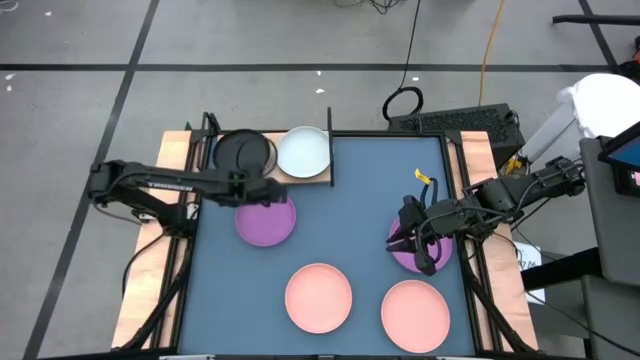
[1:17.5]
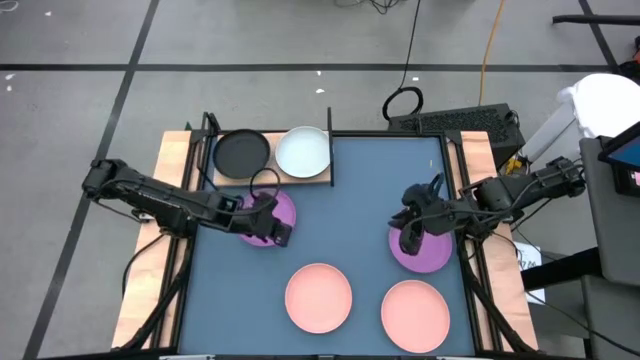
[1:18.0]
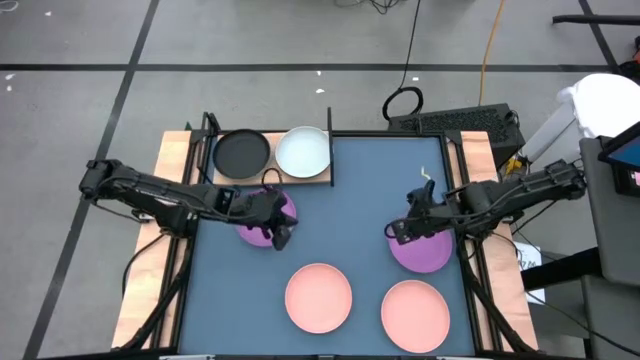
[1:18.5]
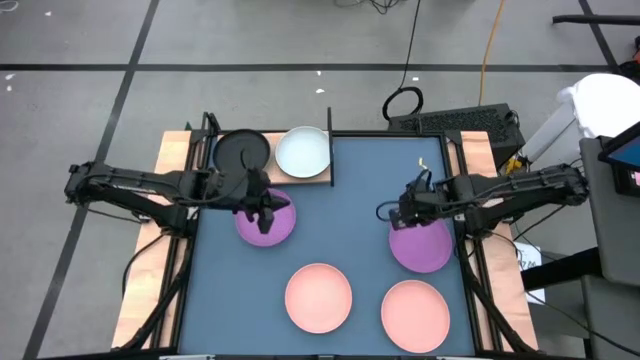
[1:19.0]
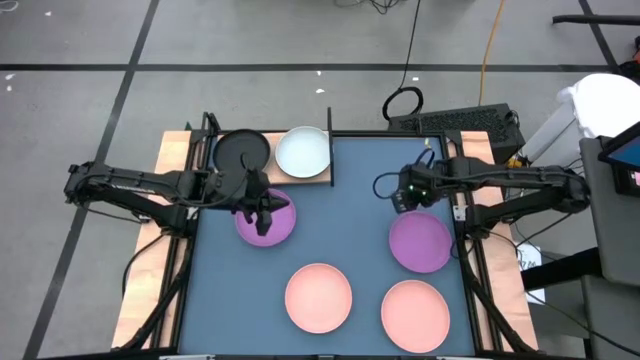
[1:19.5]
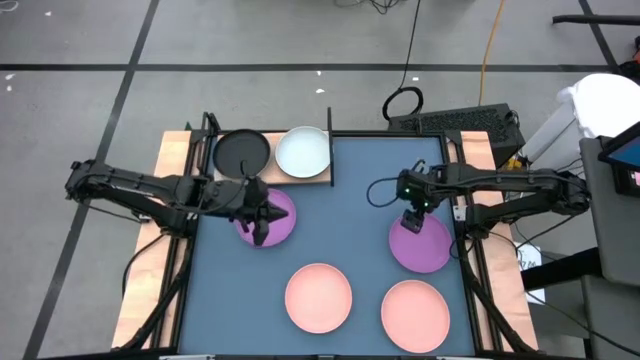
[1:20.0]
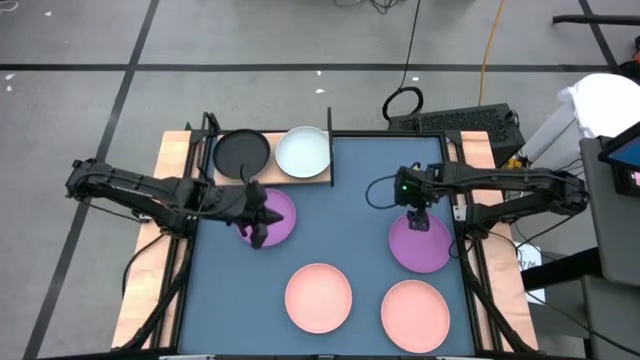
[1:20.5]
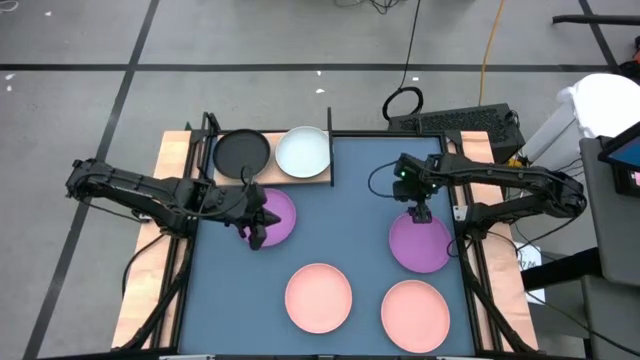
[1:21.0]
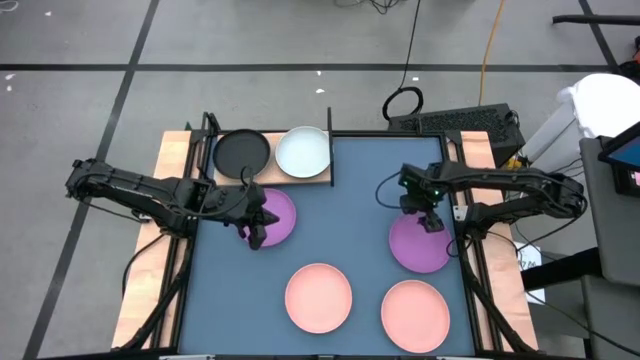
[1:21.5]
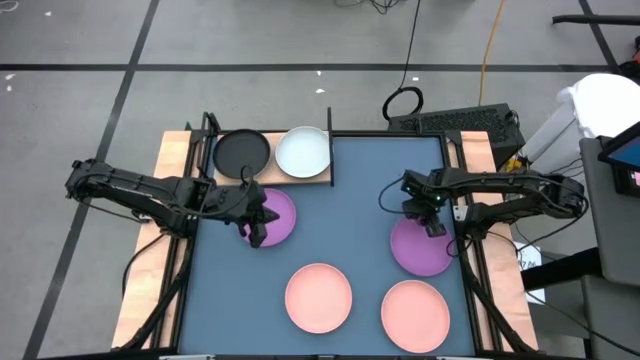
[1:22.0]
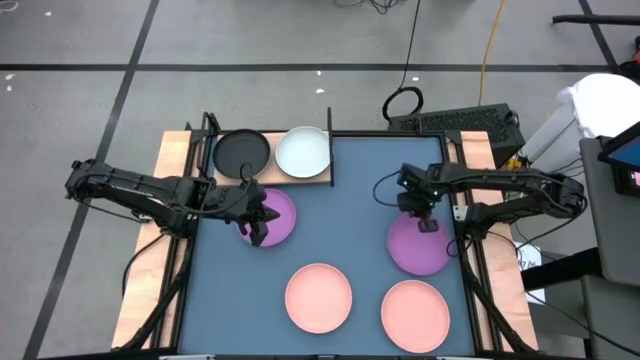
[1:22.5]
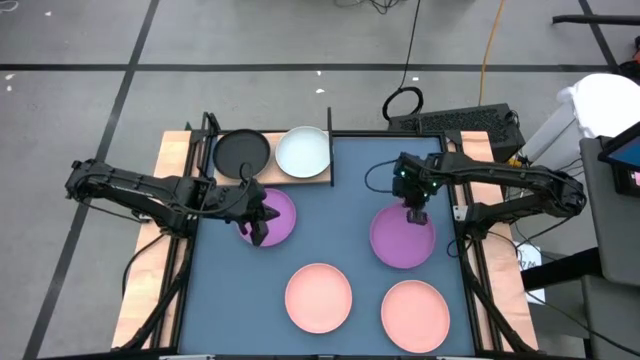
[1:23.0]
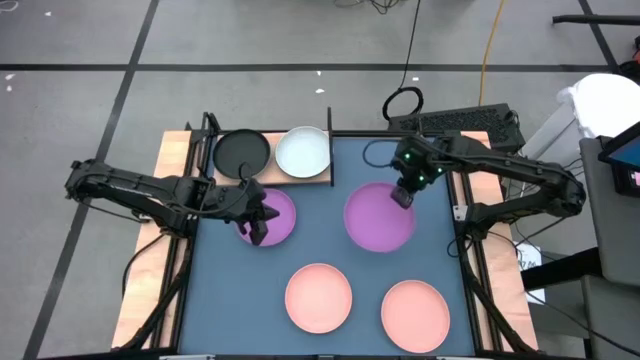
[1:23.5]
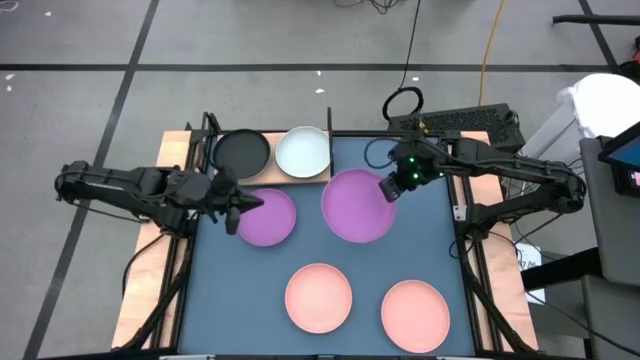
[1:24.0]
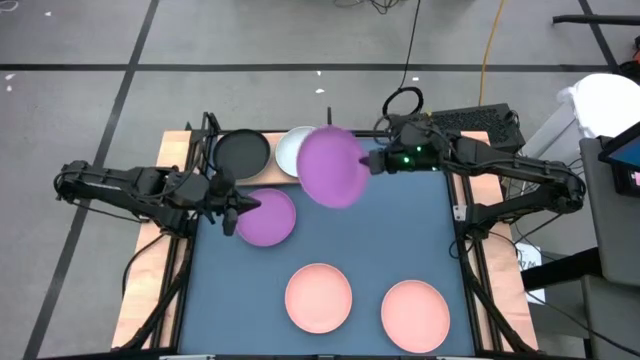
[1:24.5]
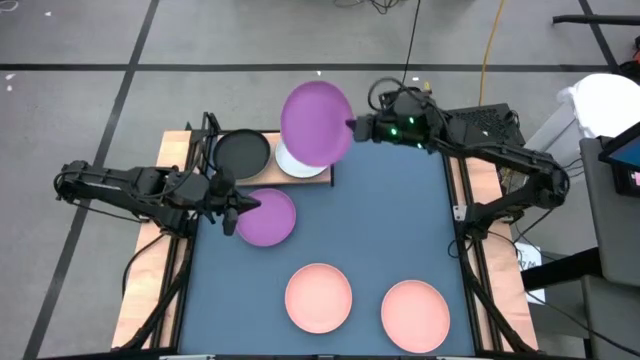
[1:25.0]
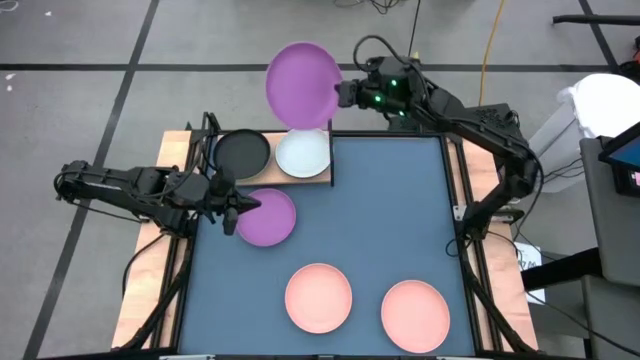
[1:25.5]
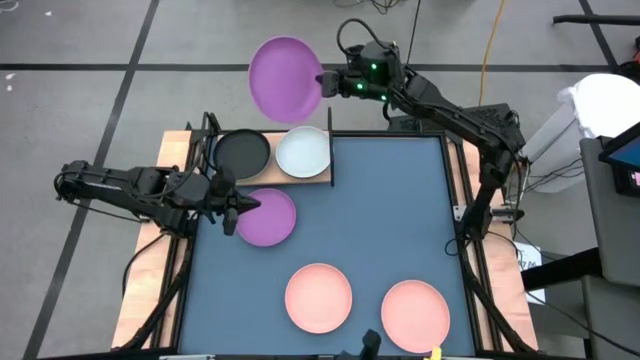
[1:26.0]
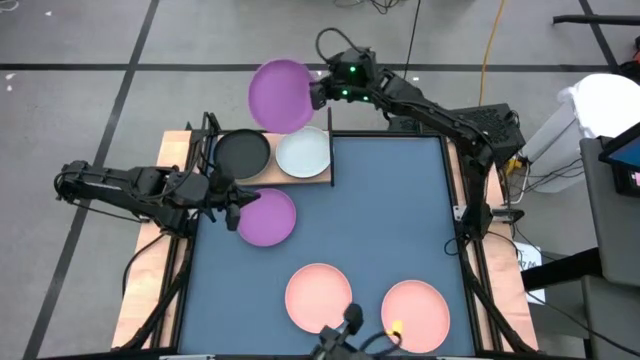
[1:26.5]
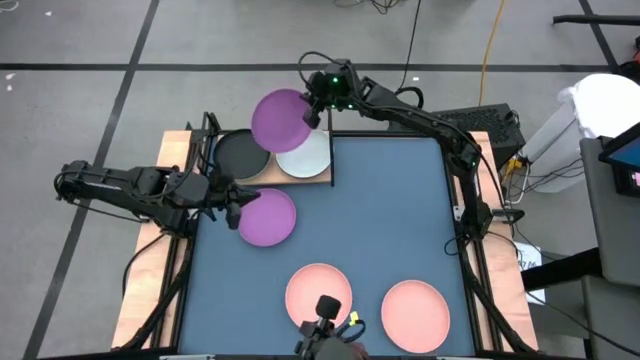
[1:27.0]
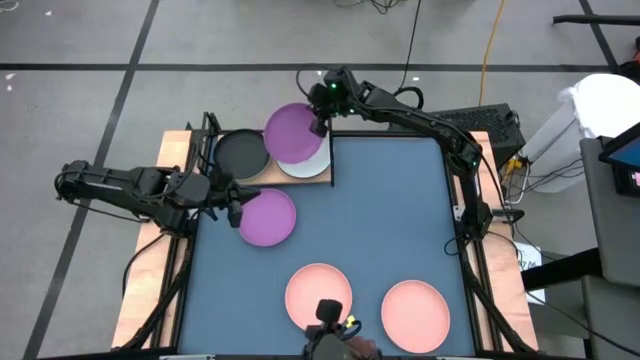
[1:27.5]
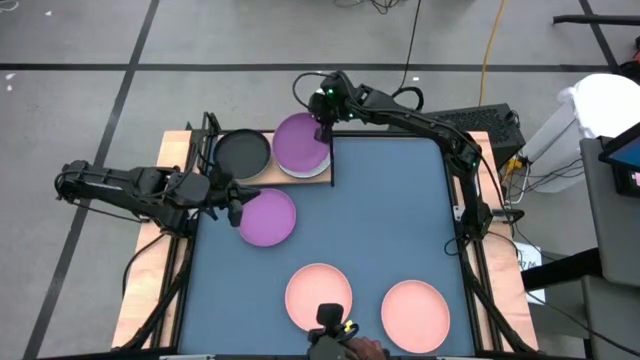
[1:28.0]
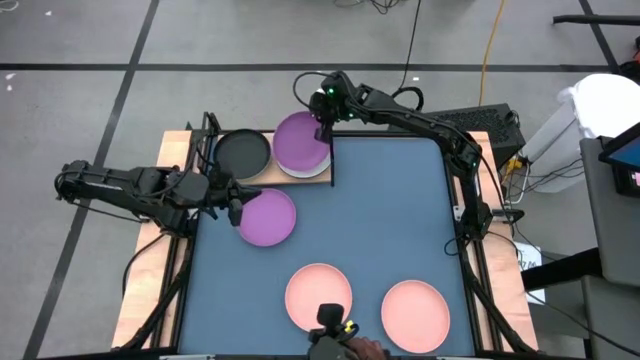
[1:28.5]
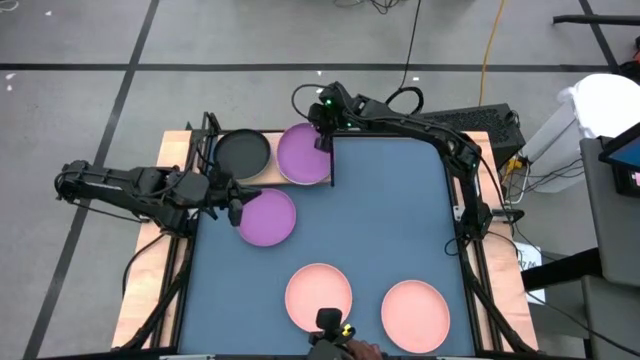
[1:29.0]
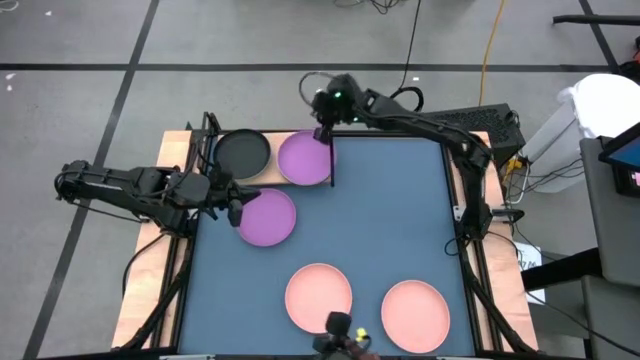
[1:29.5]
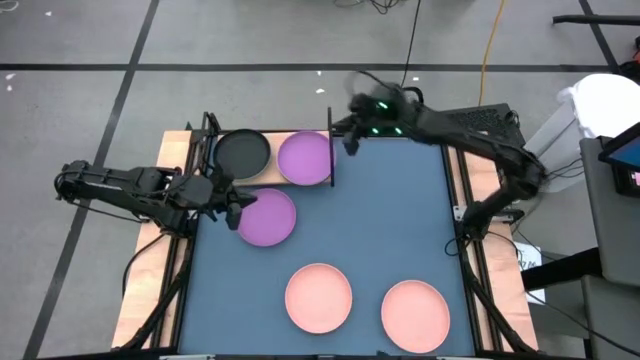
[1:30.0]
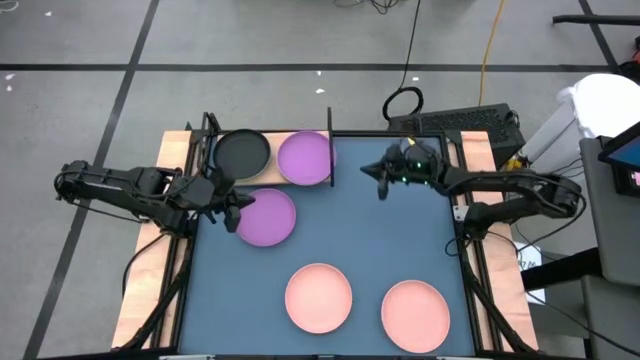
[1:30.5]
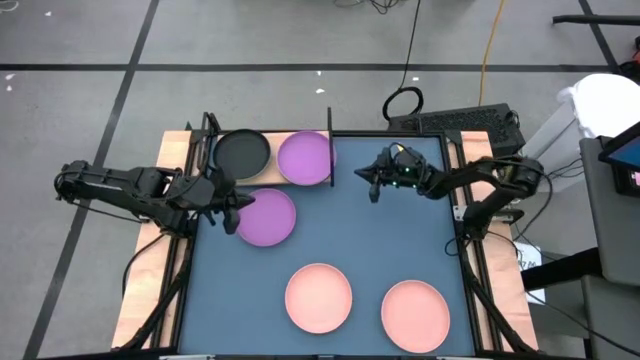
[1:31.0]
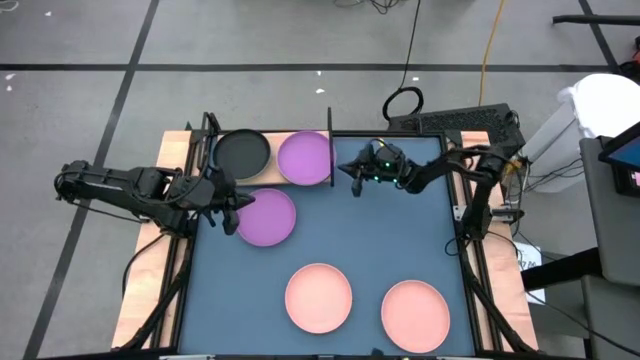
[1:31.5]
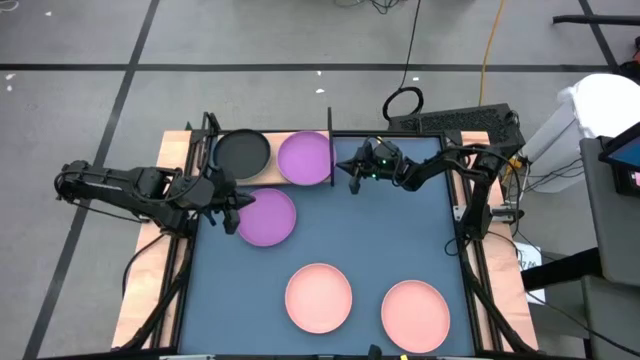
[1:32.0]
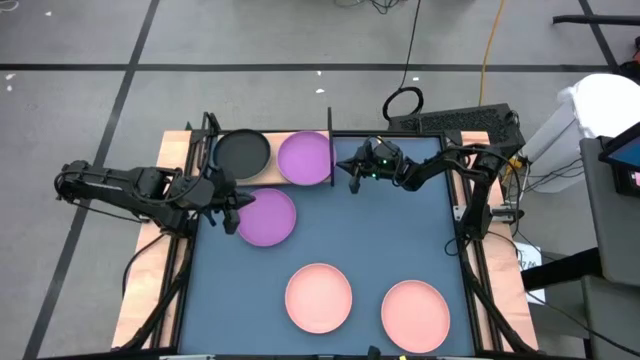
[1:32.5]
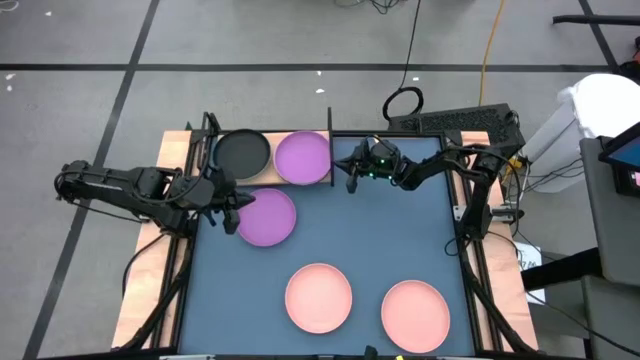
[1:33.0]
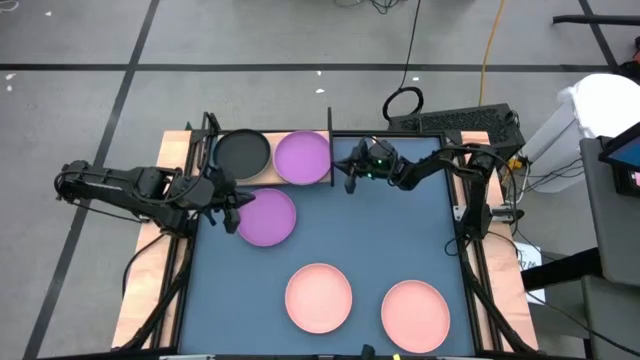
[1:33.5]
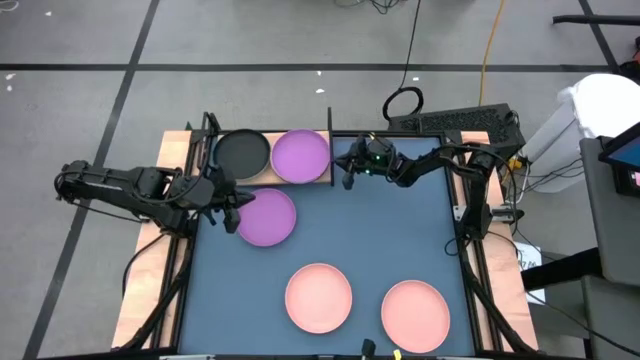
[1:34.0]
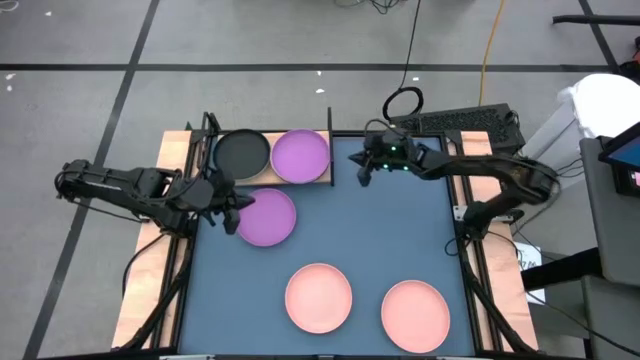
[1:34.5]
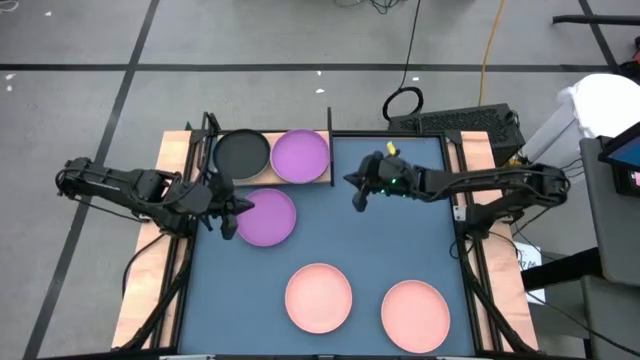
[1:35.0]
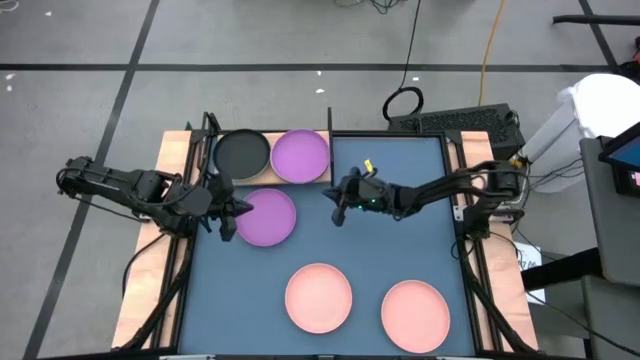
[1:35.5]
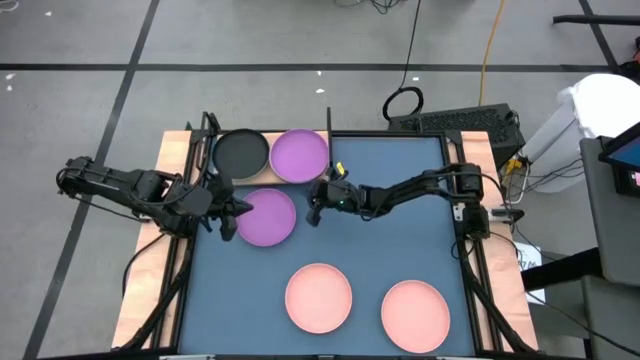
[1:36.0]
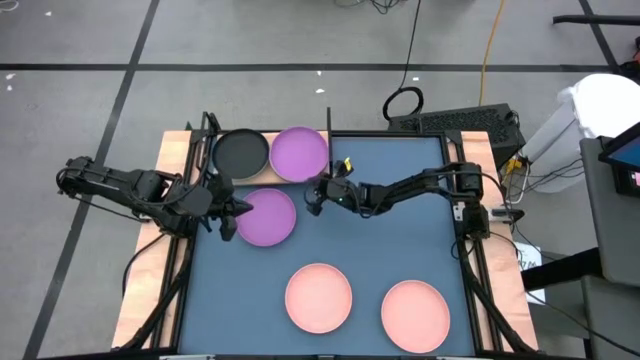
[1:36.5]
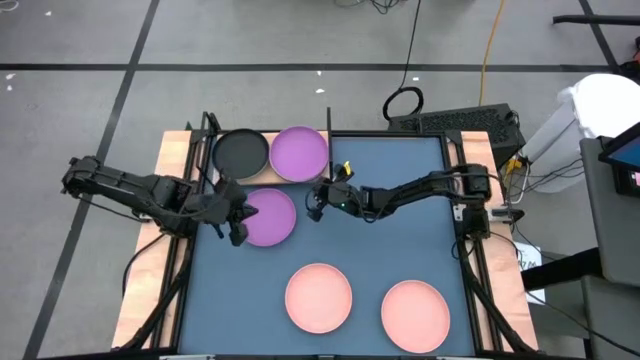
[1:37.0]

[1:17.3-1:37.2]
Task: Place and stack plates onto a shelf
Stack the right violet plate on top of the light blue plate on the shelf
